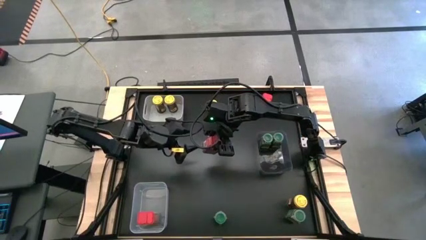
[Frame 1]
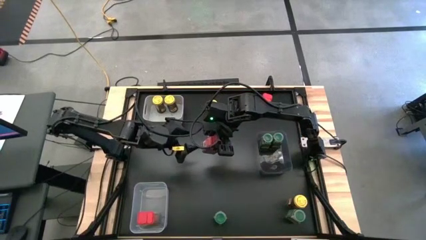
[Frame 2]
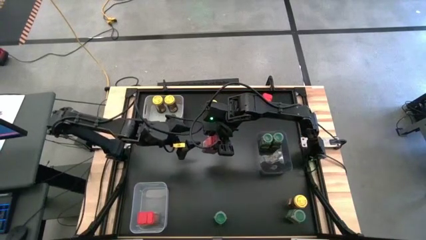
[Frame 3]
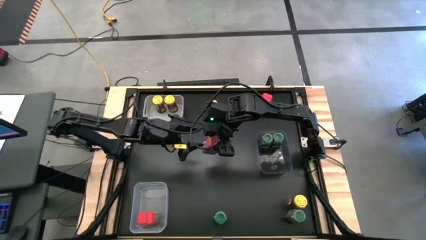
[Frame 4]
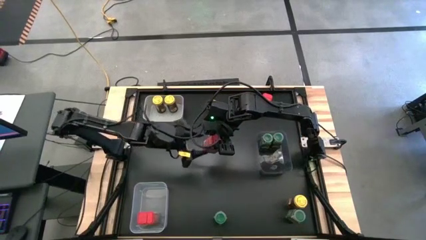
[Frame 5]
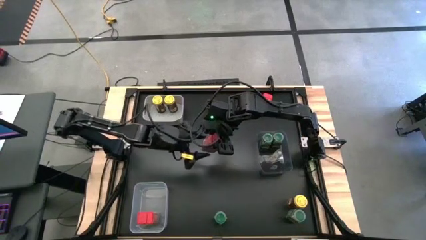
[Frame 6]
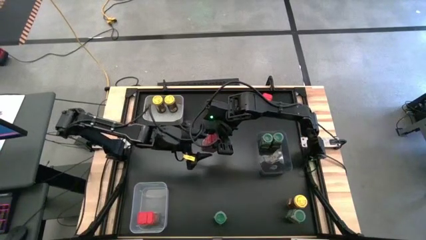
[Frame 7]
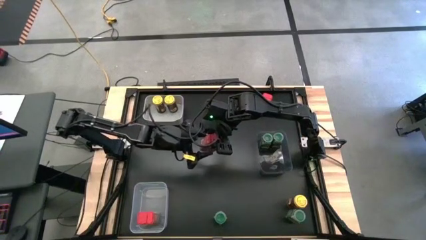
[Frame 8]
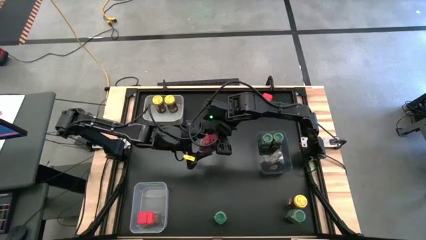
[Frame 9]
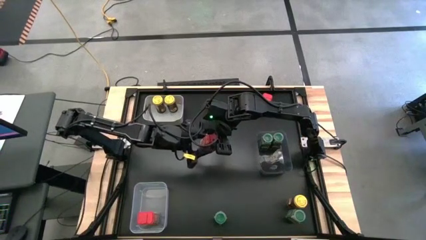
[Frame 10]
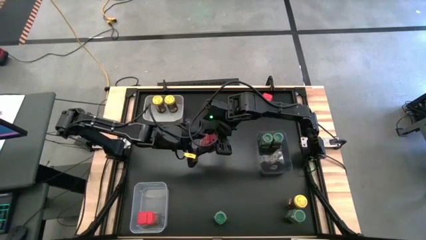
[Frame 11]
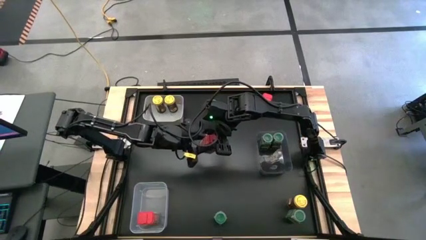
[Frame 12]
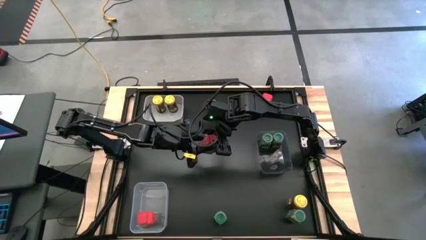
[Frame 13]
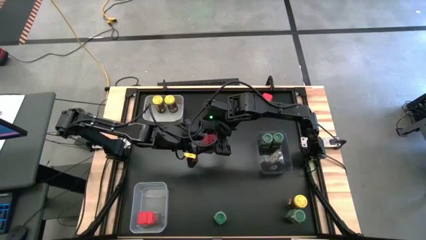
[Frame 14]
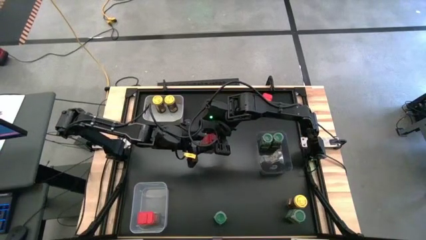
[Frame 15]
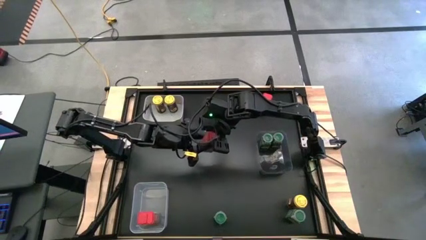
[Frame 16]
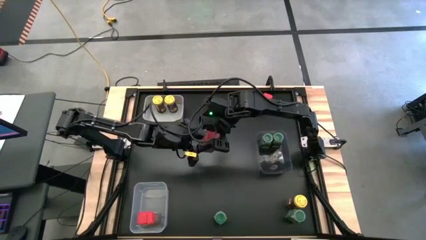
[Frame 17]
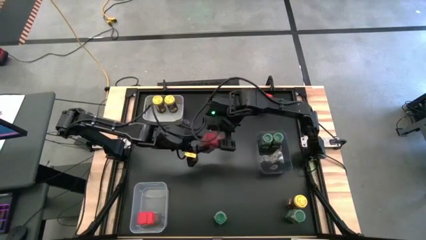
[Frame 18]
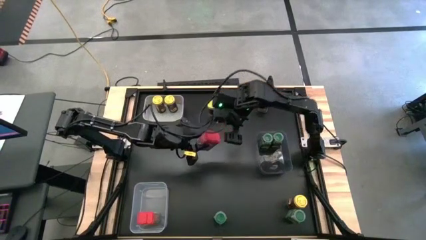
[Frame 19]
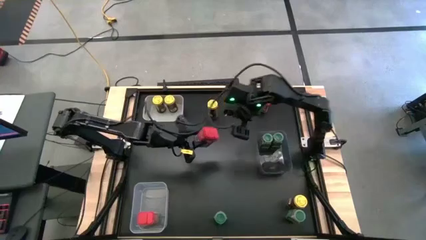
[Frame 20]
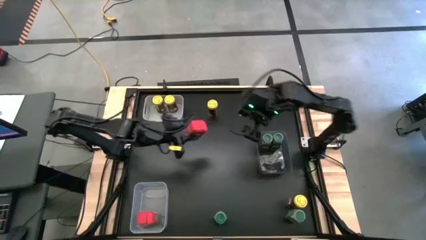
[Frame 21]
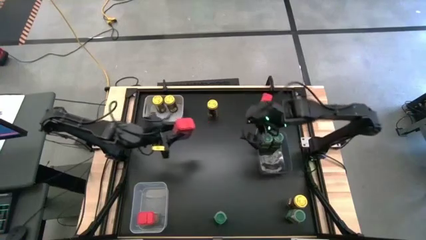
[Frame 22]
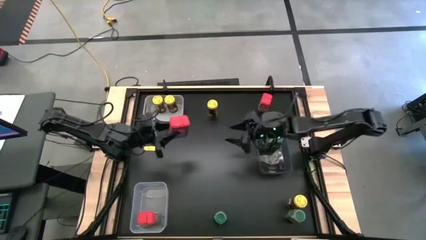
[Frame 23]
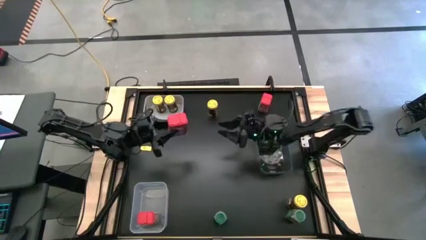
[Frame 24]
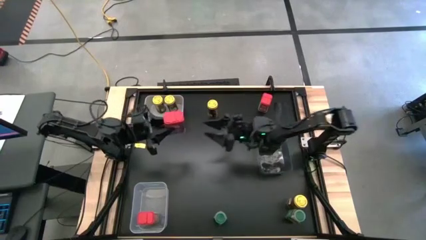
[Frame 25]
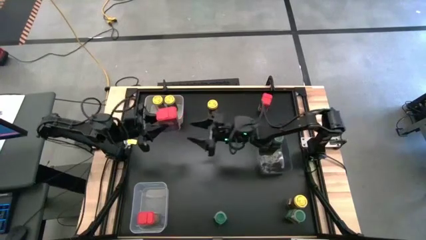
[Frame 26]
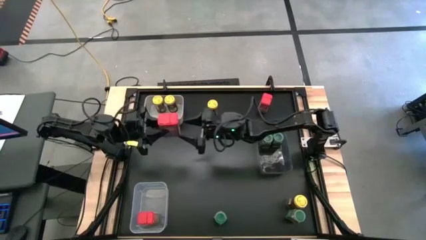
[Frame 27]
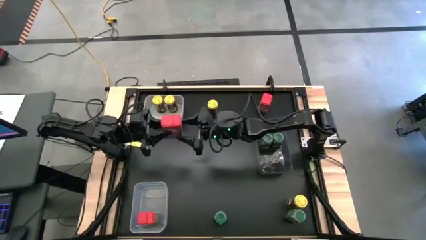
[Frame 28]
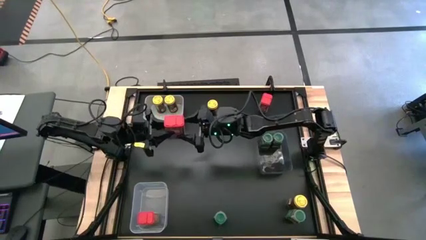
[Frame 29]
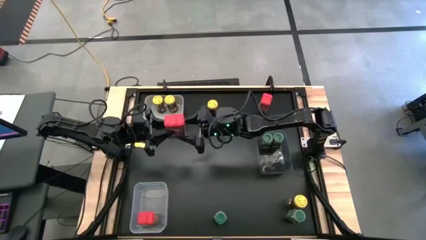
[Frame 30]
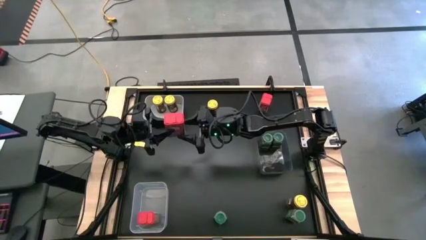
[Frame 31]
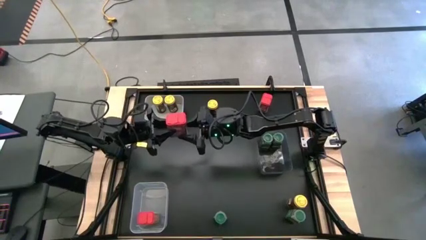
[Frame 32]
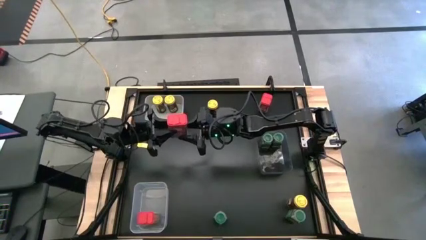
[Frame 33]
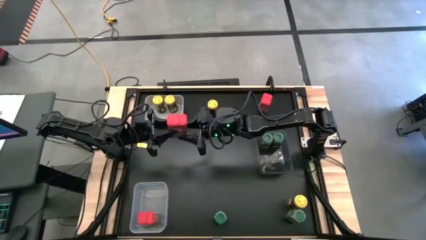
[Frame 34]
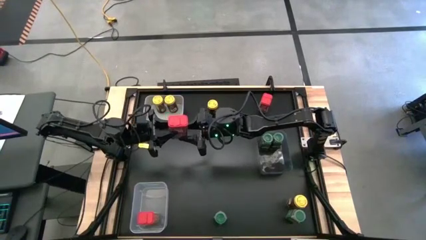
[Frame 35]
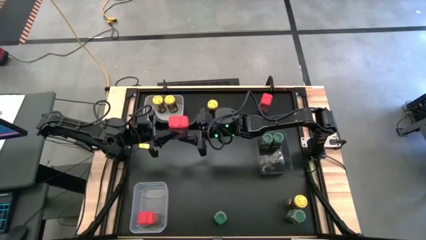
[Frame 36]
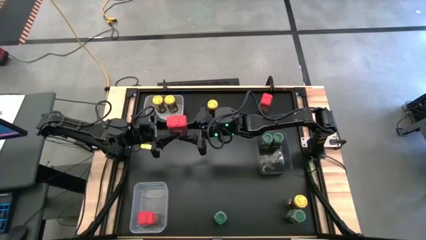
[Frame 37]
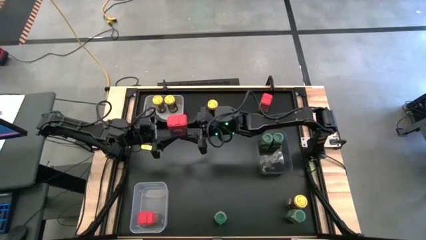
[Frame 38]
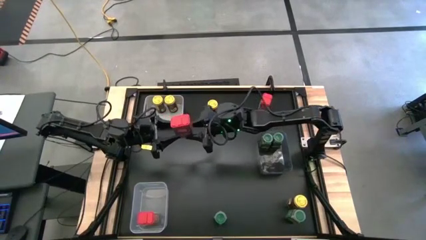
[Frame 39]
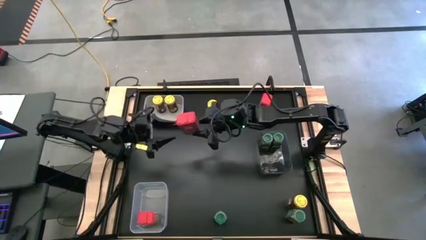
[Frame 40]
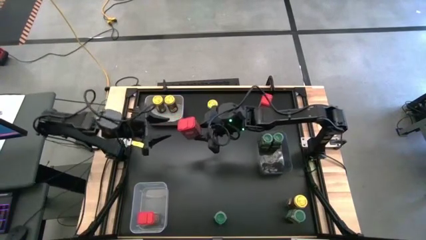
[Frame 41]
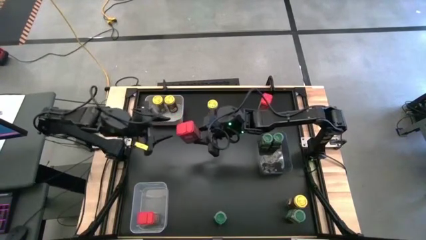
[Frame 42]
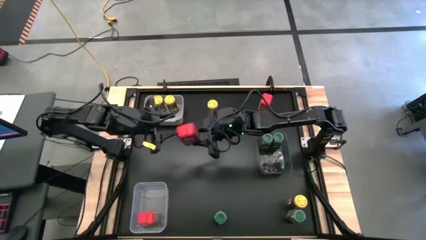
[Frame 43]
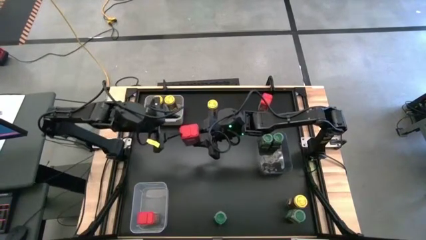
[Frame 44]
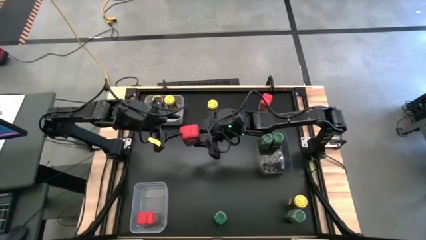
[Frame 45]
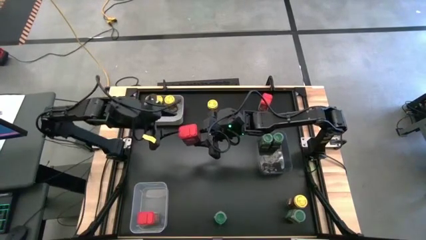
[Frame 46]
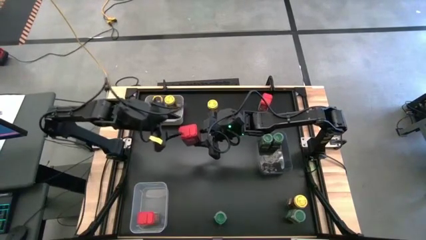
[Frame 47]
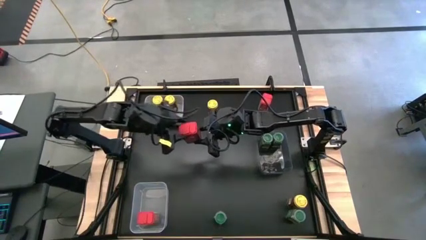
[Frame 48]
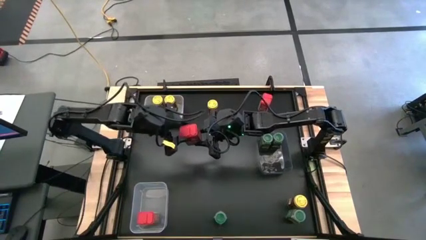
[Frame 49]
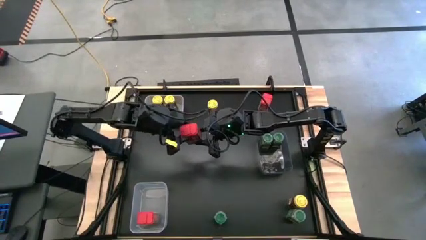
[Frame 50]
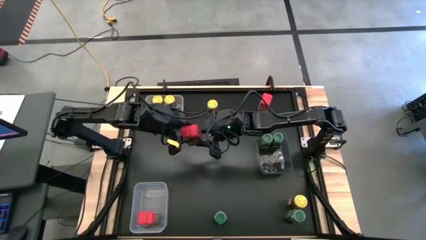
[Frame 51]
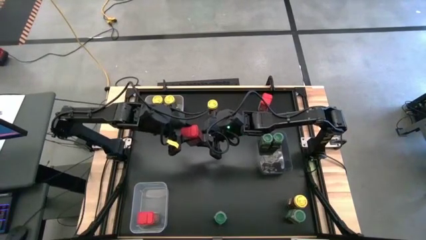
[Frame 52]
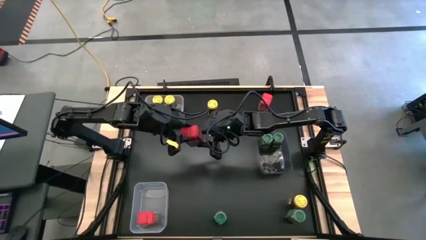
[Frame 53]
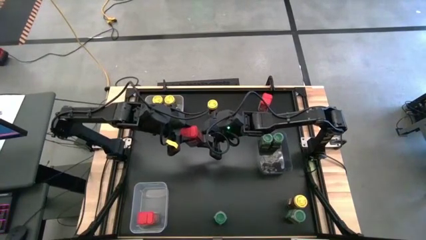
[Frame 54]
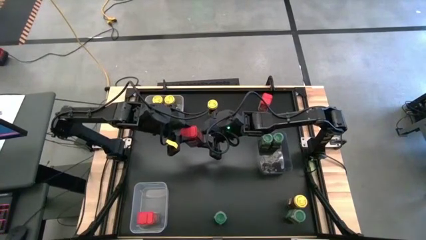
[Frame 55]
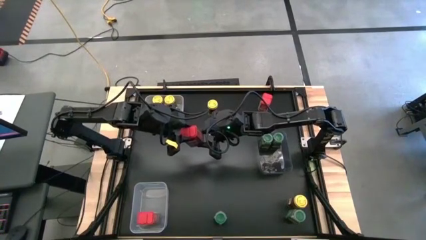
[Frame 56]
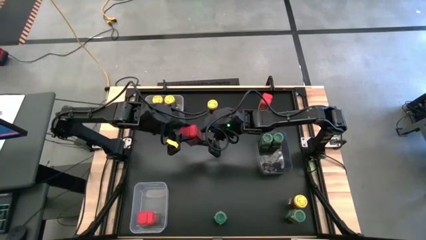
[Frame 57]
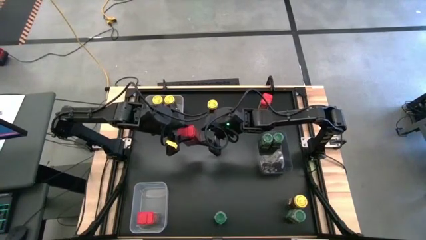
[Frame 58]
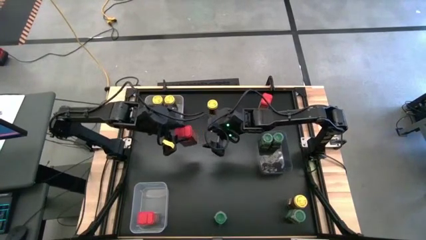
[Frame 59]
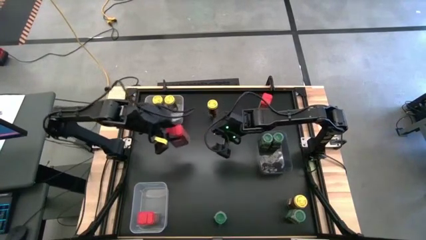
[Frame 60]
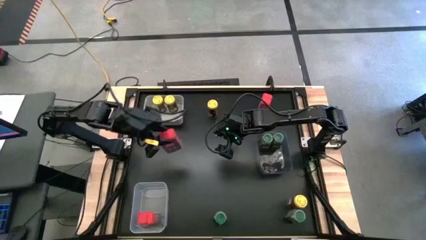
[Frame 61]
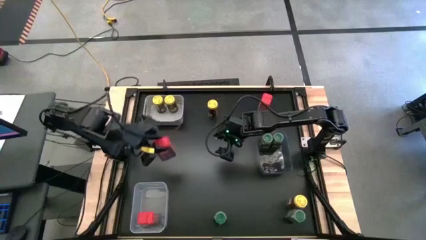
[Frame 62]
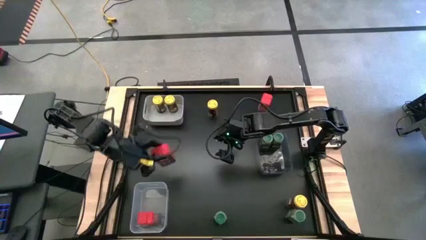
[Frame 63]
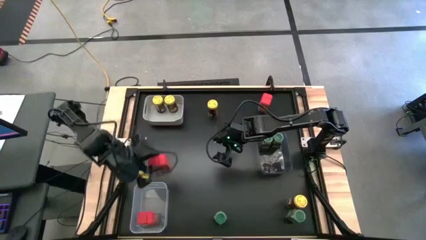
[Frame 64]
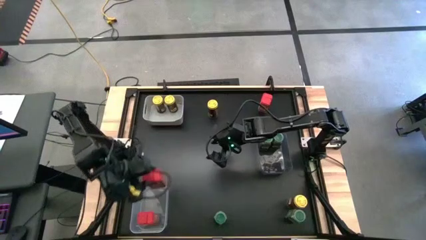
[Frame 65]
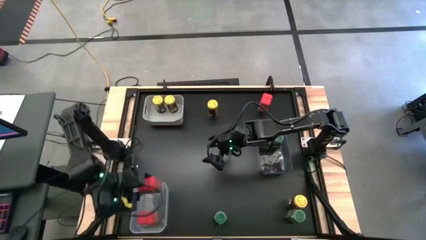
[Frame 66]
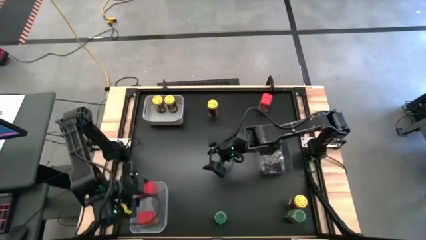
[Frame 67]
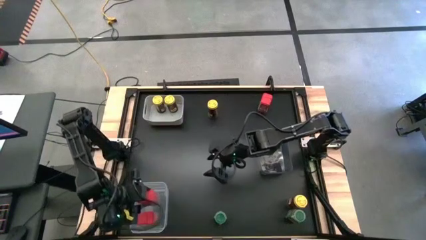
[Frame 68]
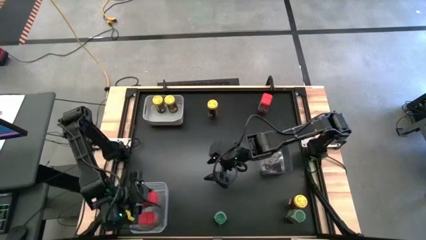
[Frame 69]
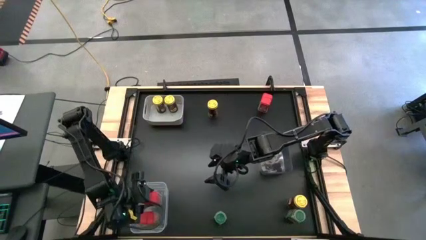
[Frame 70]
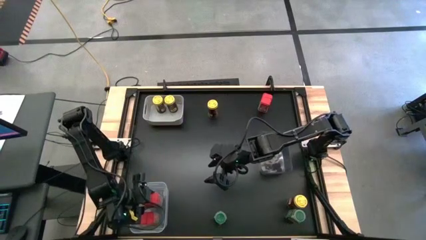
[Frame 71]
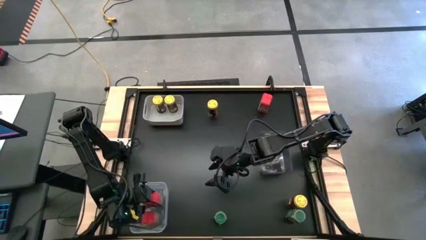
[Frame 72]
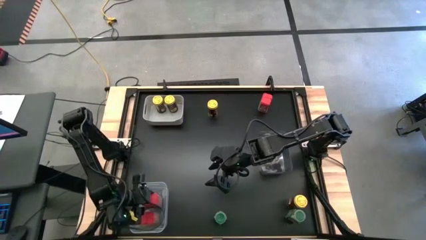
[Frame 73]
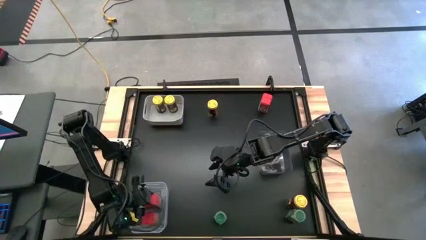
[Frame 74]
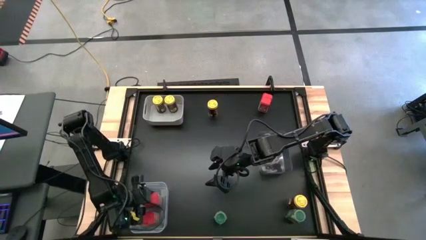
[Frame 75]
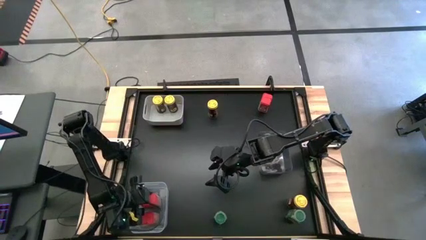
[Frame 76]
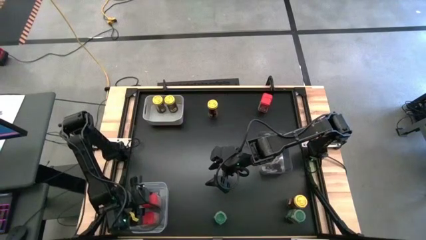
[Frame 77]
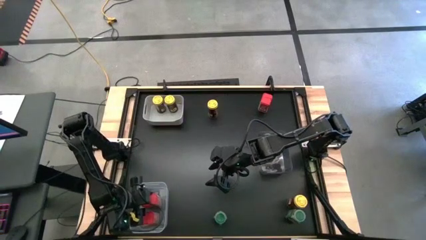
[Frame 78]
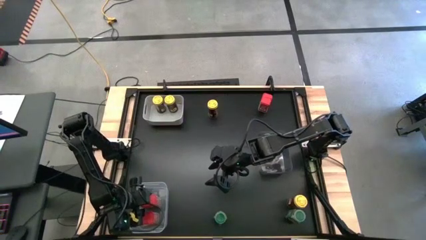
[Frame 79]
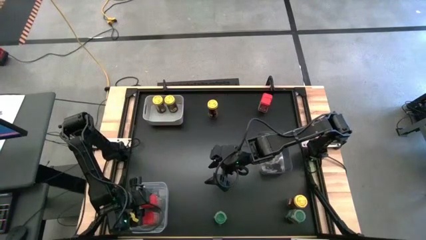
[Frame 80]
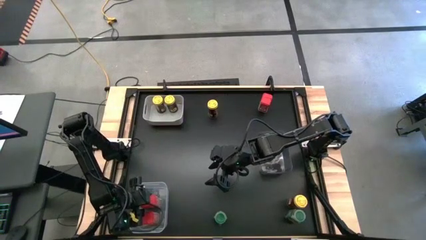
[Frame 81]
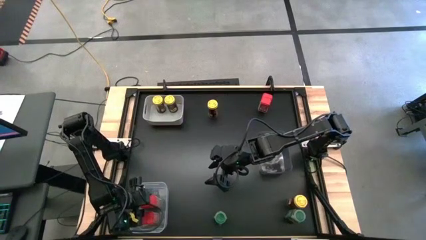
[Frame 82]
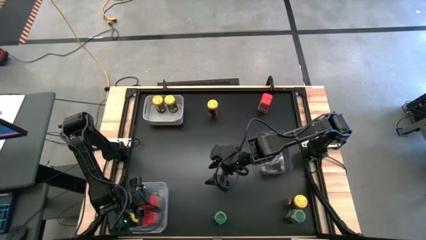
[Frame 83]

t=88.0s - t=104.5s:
Task: Sort spices by type
Put the bottom red seasoning can into the transparent bin
